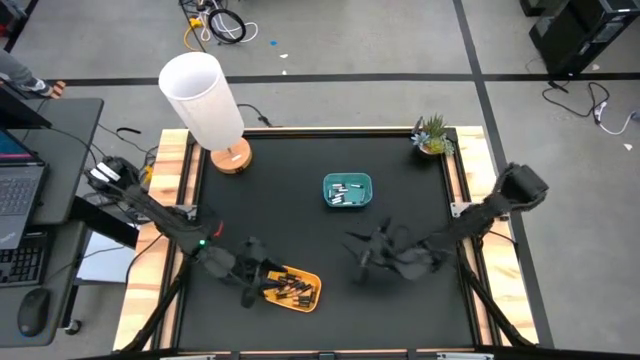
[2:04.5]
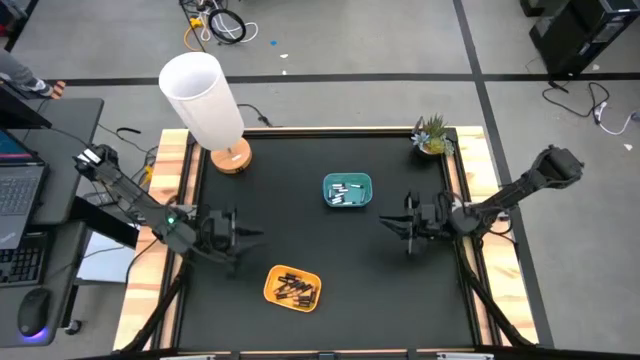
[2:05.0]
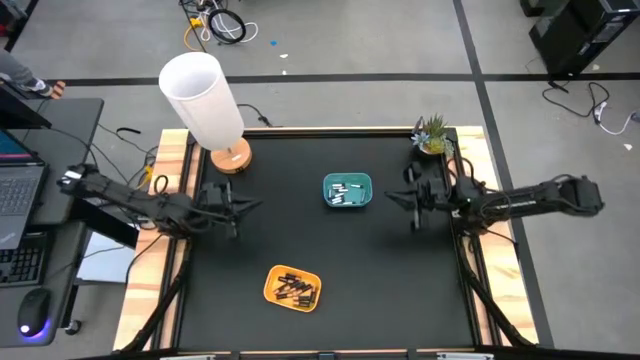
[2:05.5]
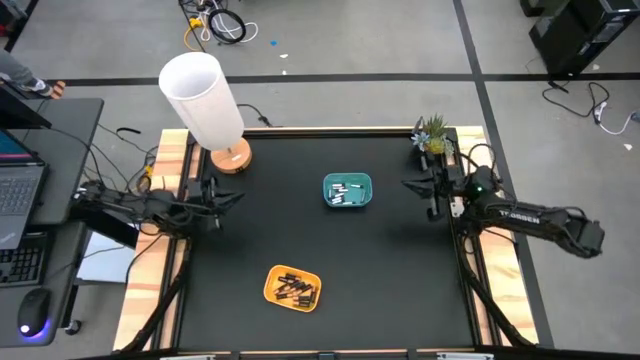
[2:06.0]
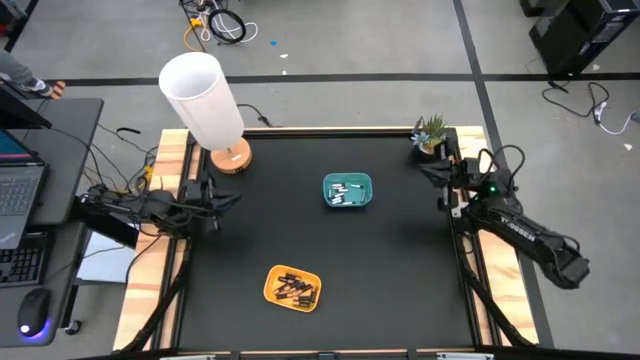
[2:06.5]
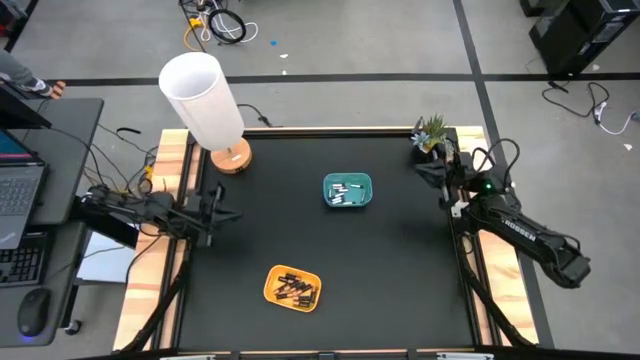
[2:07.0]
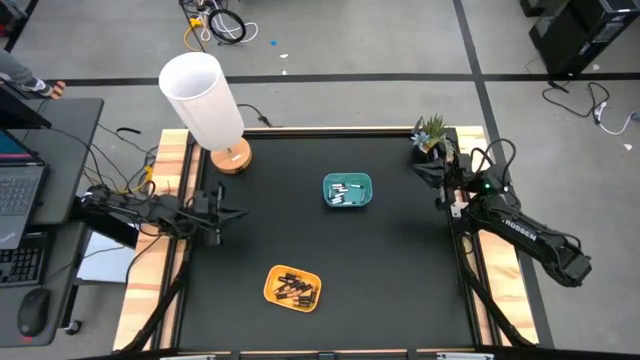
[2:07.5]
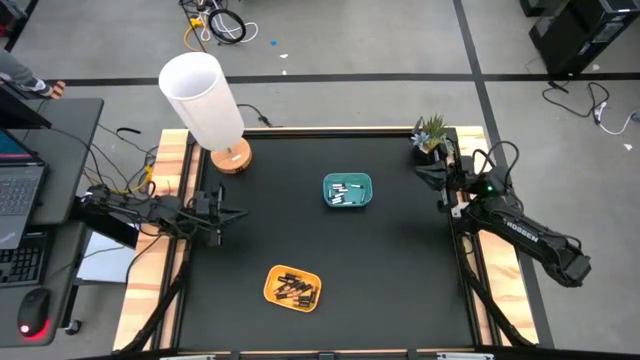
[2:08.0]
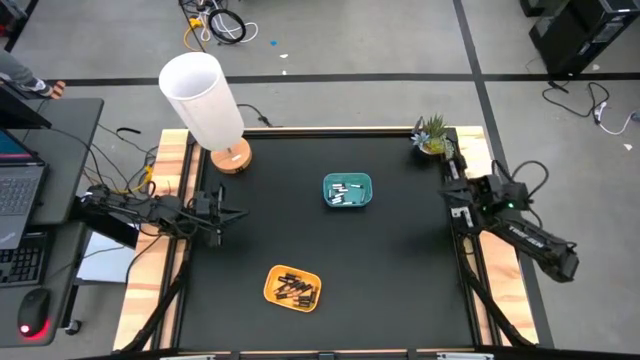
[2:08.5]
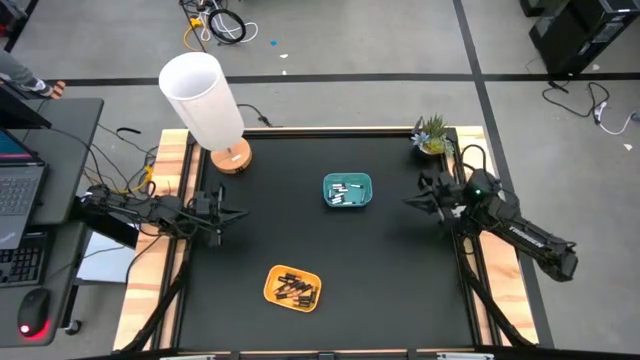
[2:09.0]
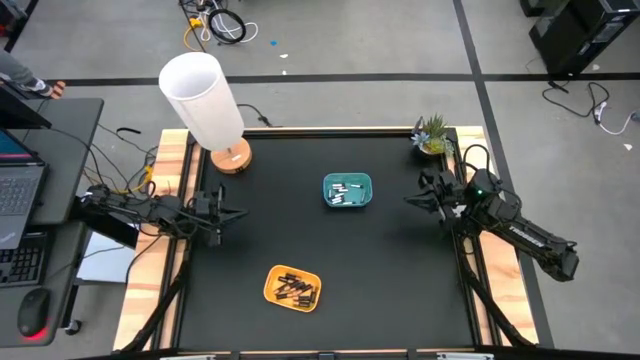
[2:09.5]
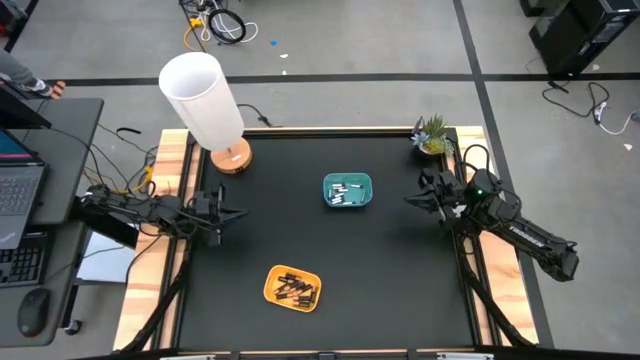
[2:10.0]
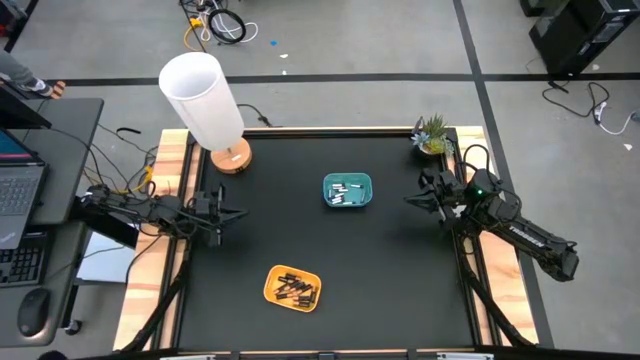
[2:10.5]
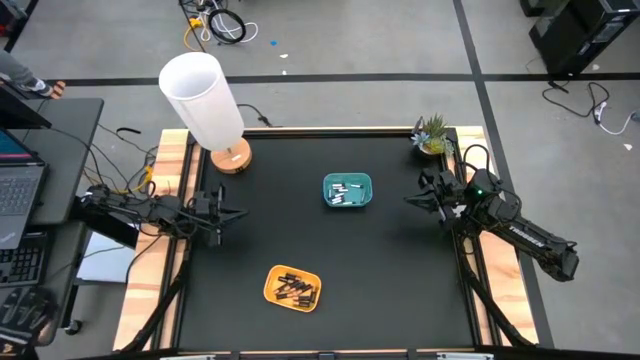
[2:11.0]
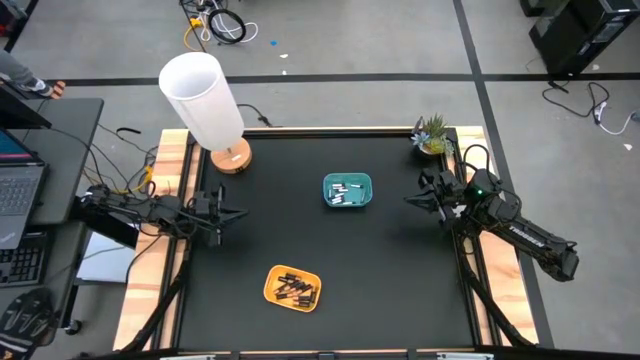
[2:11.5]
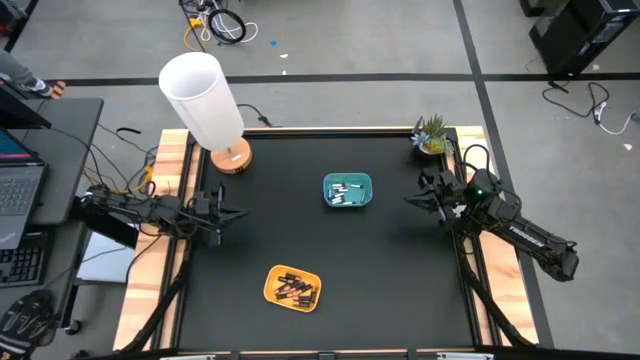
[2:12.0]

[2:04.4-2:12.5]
Task: Sort batteries
Return to Home Position

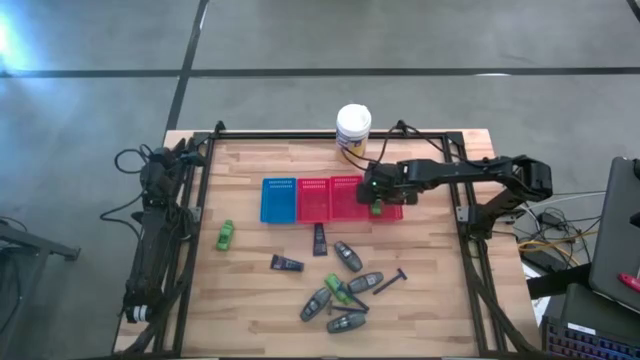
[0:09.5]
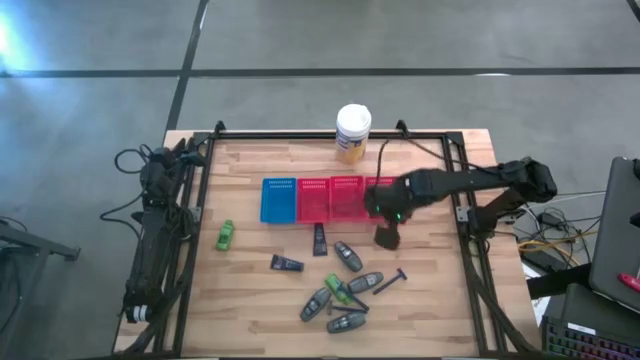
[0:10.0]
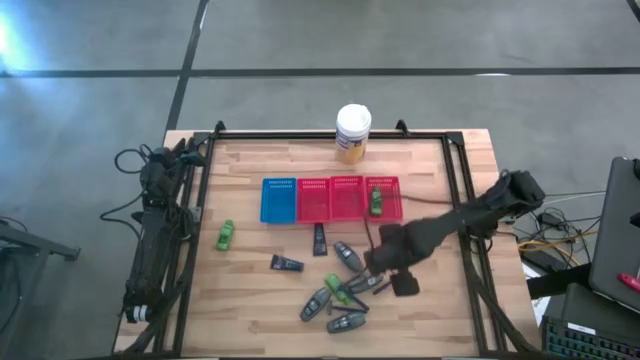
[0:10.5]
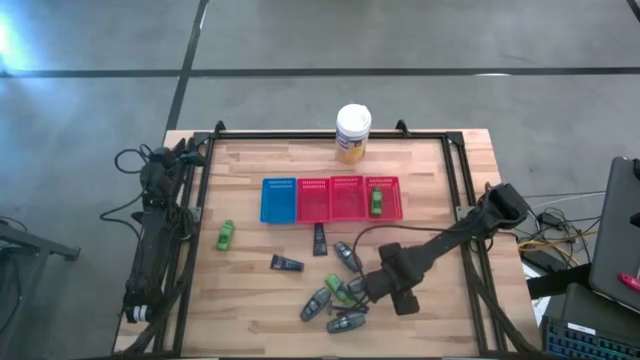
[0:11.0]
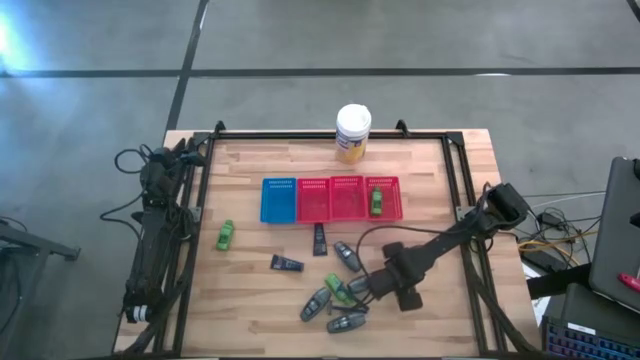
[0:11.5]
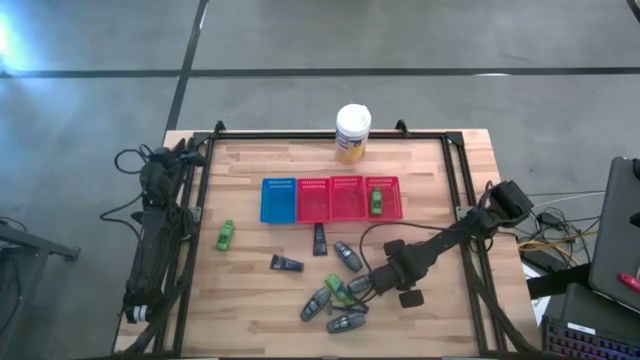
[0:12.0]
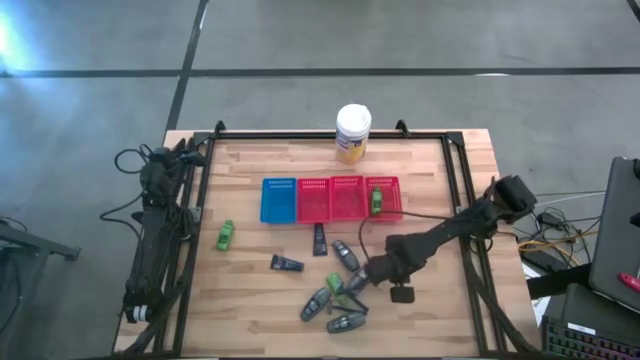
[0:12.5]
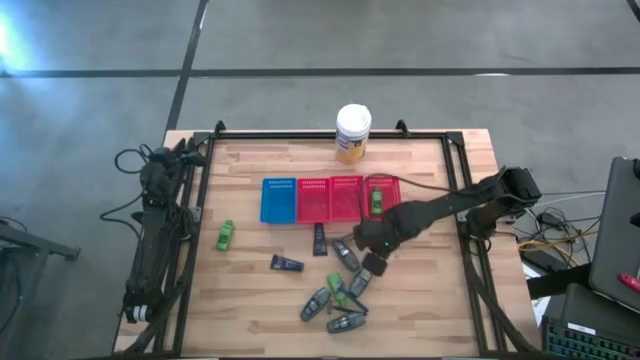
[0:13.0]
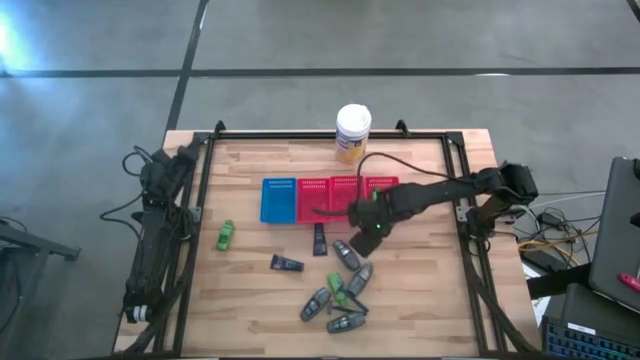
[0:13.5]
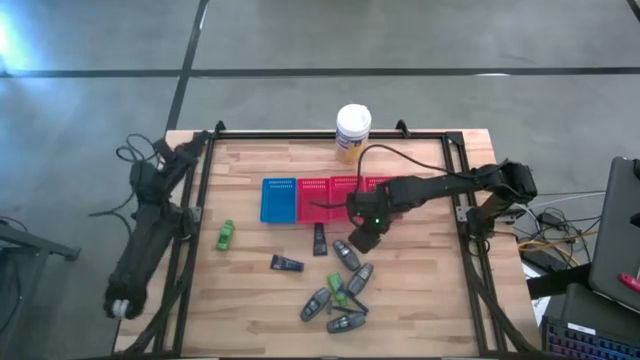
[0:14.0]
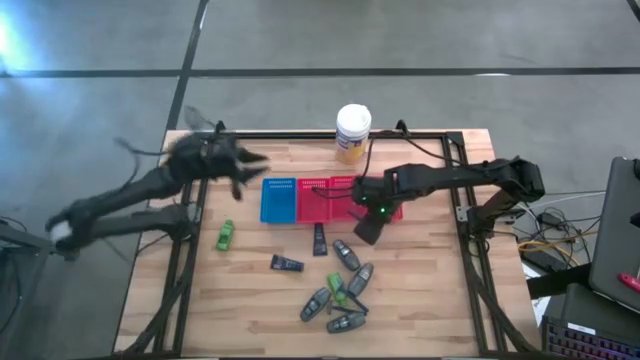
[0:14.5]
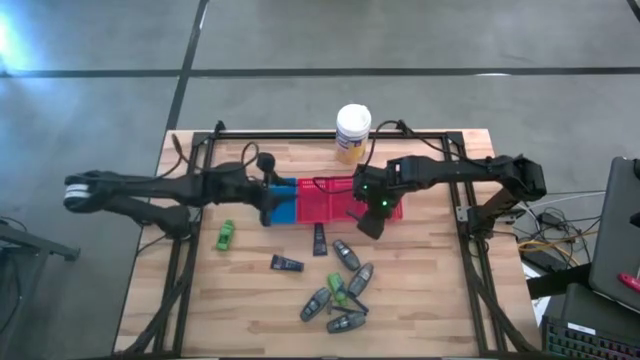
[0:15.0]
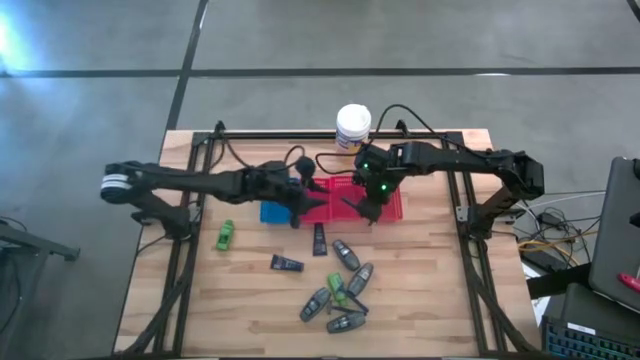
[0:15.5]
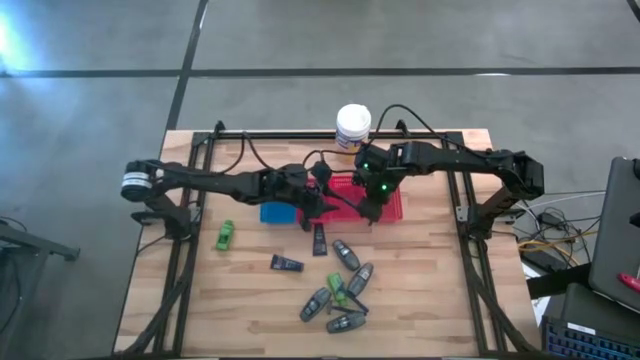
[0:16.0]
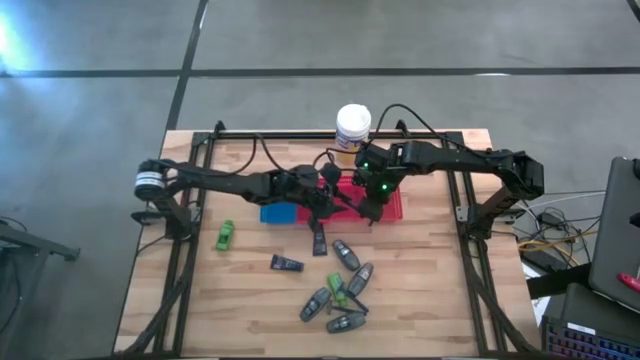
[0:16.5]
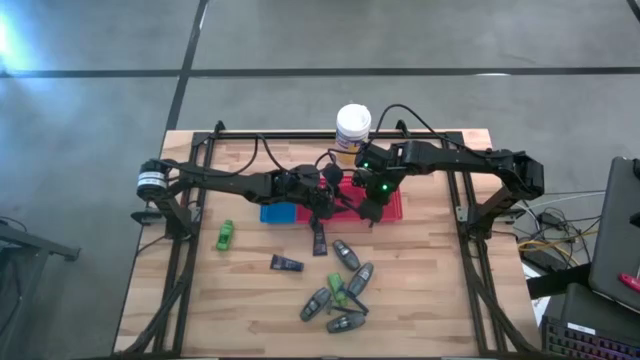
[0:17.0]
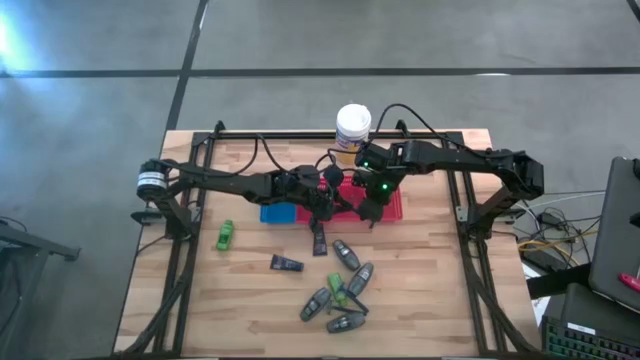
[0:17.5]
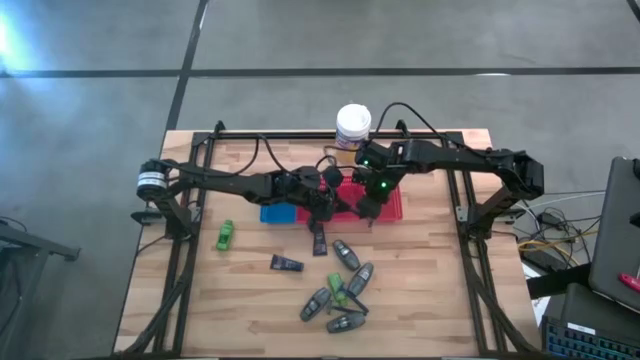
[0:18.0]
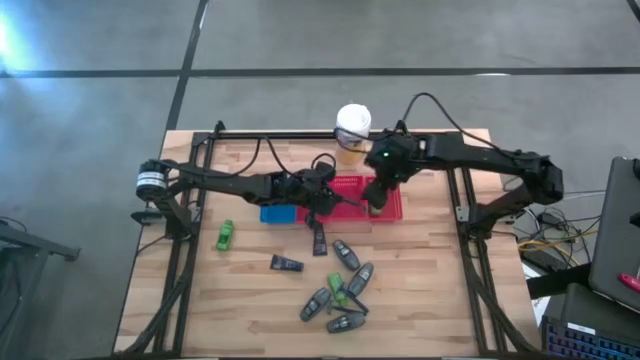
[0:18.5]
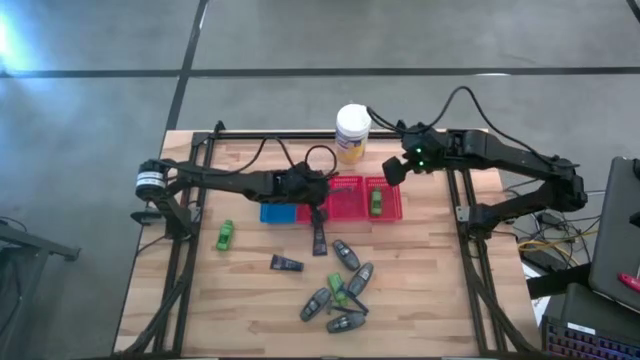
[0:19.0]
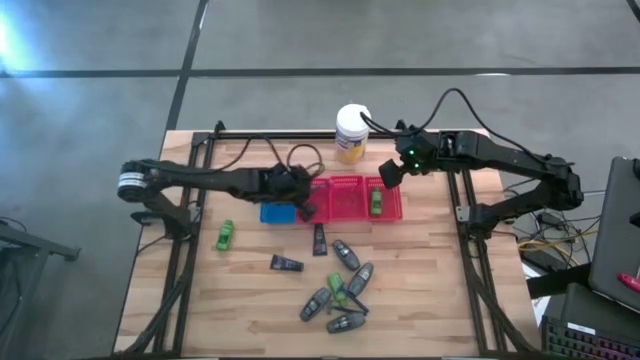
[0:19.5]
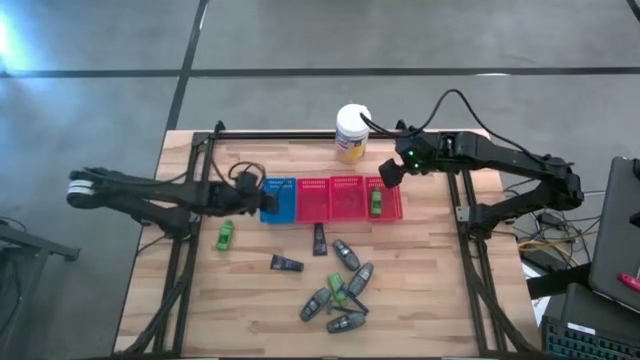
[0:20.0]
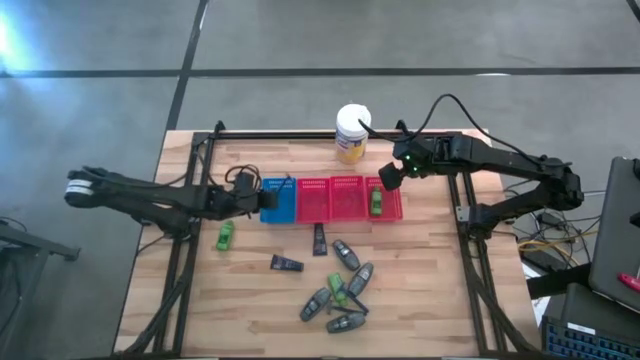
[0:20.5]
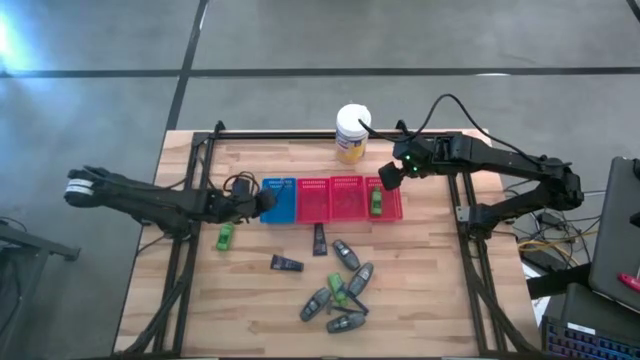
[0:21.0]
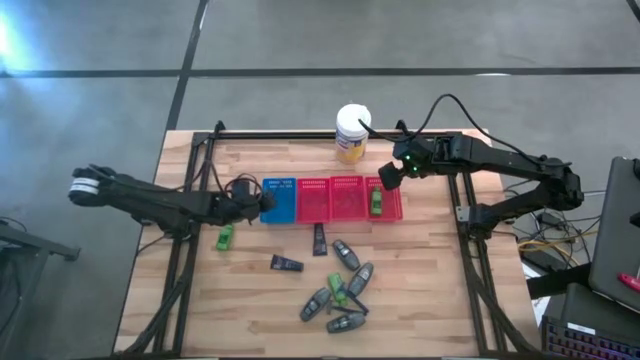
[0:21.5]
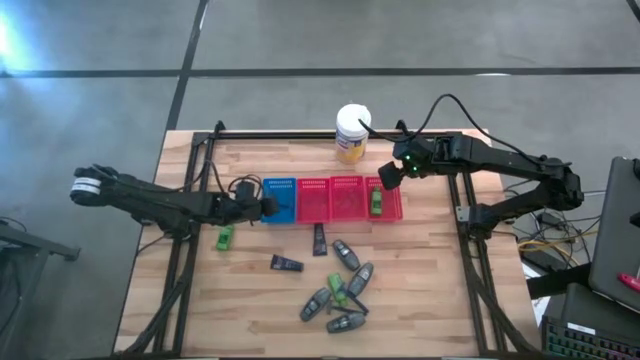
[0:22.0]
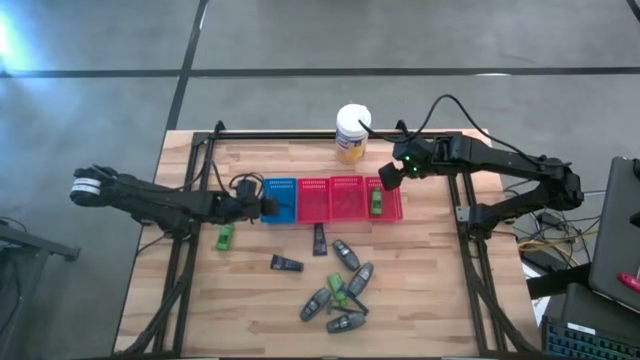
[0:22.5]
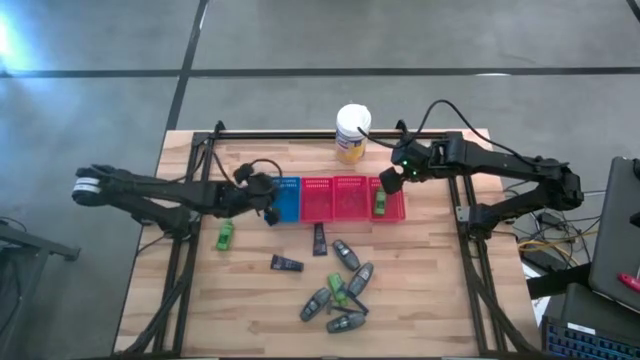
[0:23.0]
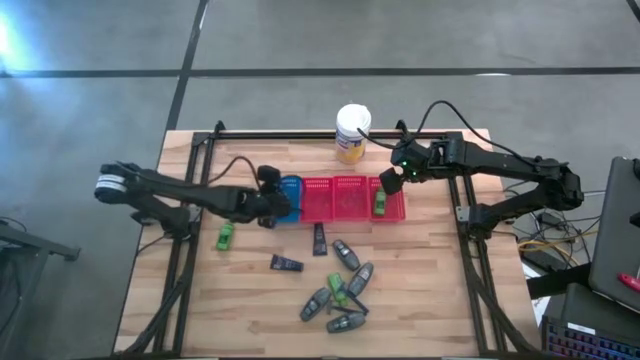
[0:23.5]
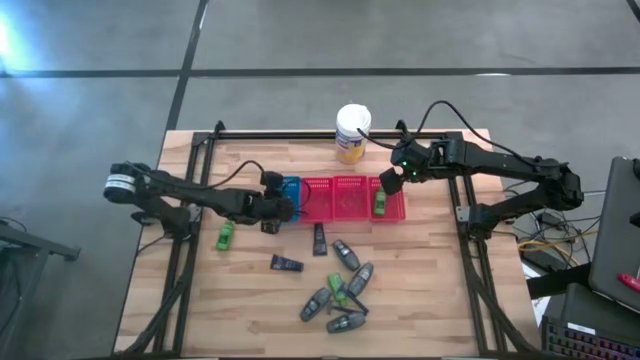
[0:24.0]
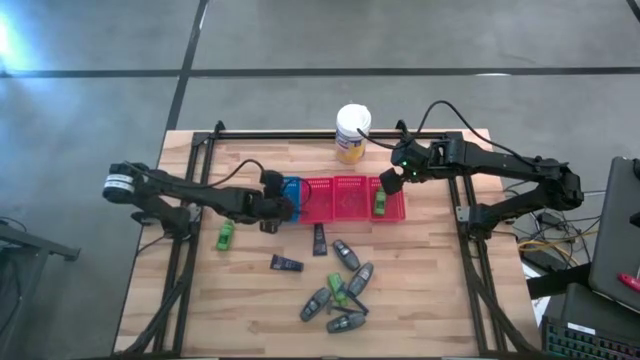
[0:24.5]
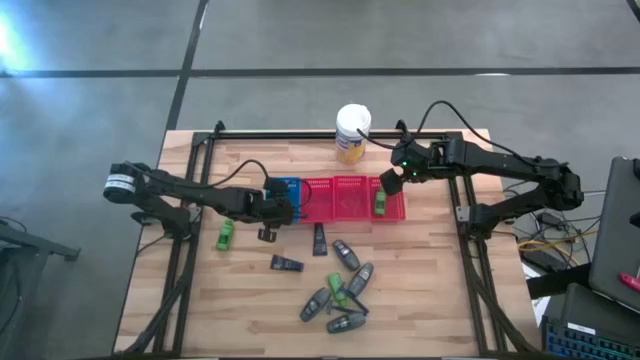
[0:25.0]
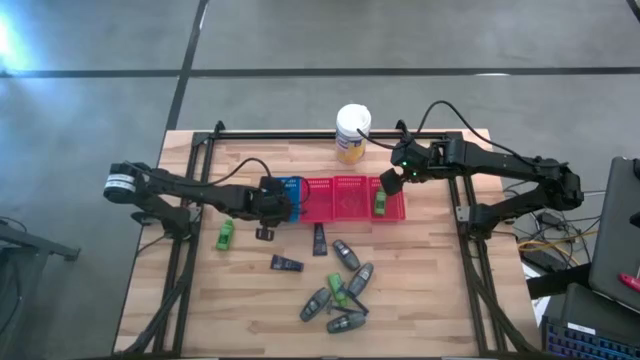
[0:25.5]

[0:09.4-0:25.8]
Task: Pick & Place Travel size toiletries
Put the blue razor into the blue bin
